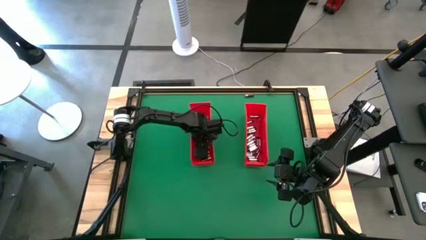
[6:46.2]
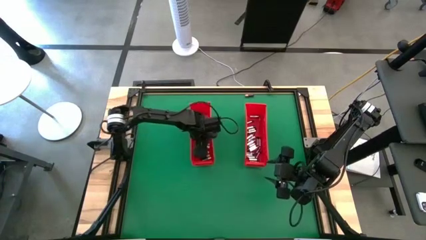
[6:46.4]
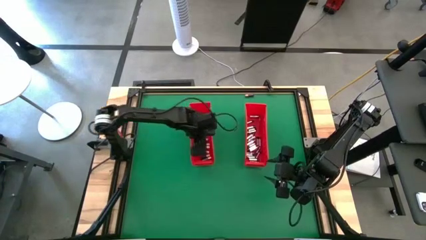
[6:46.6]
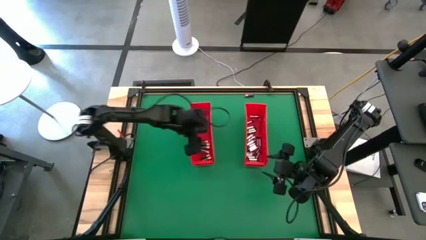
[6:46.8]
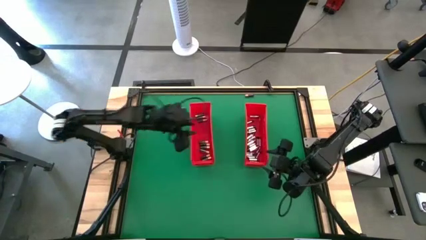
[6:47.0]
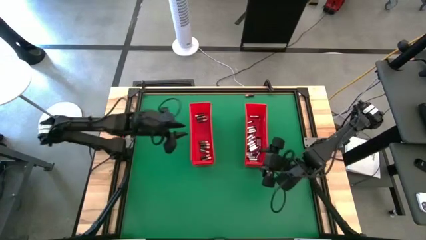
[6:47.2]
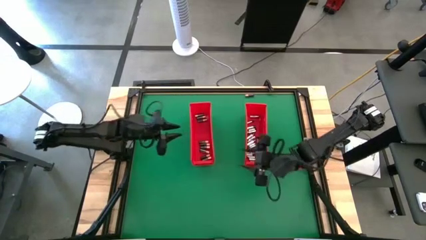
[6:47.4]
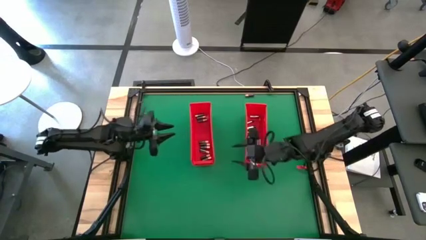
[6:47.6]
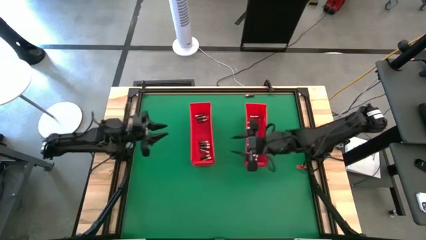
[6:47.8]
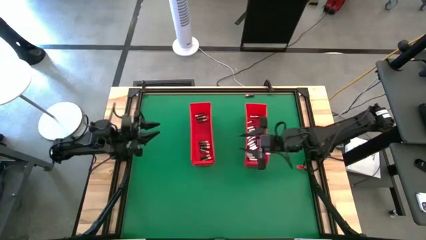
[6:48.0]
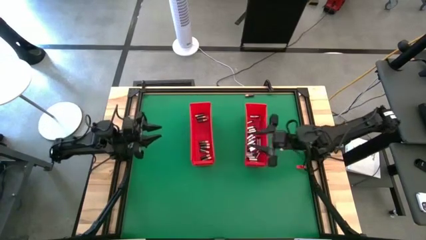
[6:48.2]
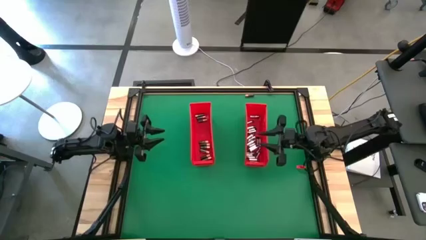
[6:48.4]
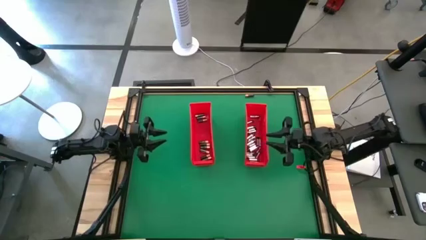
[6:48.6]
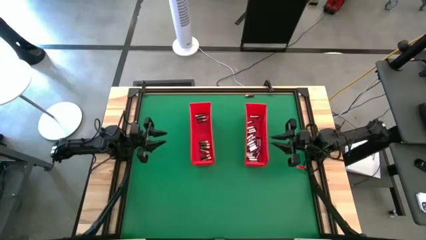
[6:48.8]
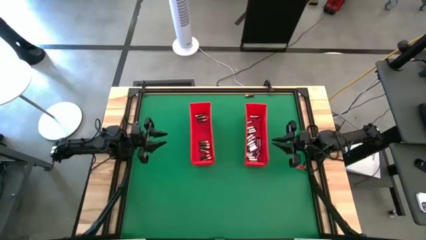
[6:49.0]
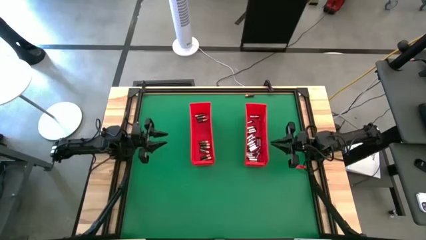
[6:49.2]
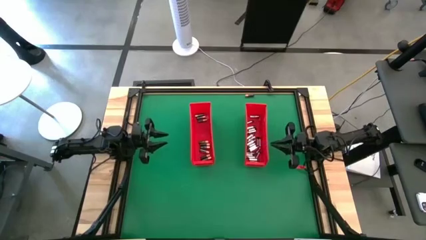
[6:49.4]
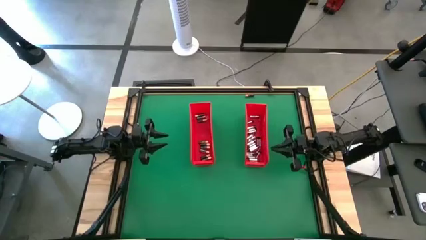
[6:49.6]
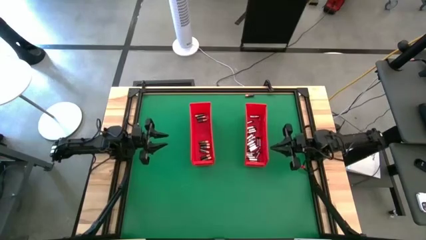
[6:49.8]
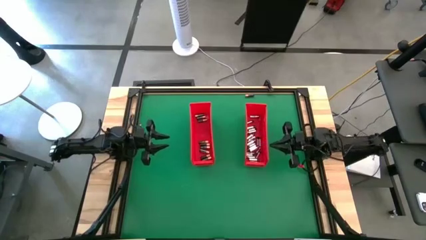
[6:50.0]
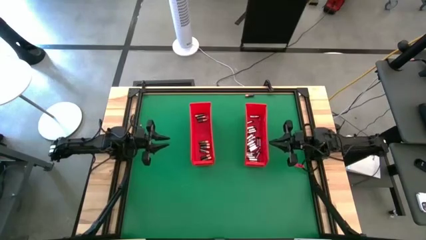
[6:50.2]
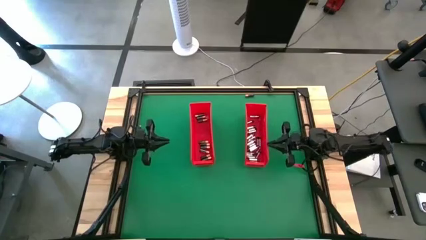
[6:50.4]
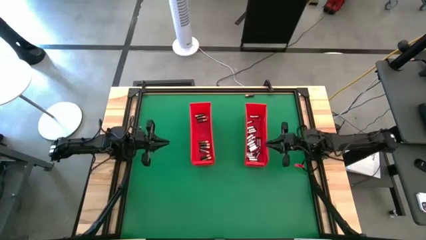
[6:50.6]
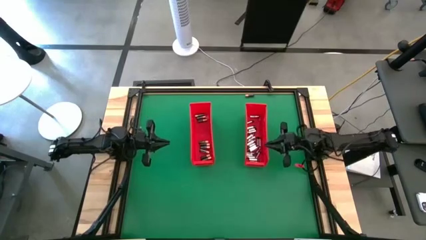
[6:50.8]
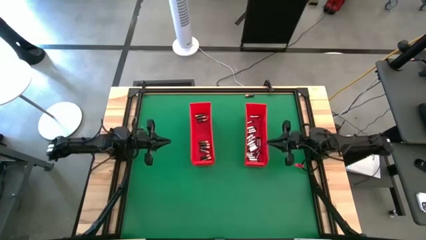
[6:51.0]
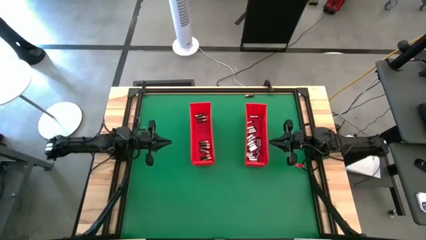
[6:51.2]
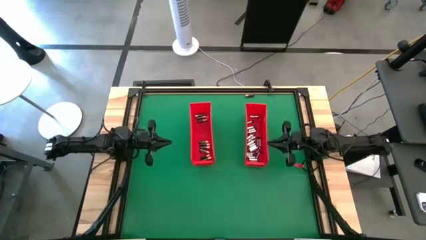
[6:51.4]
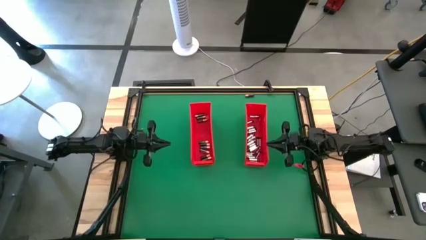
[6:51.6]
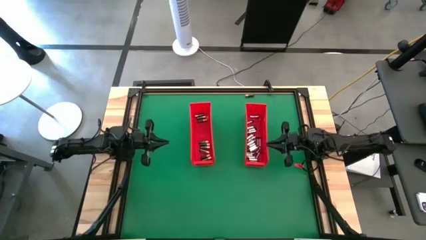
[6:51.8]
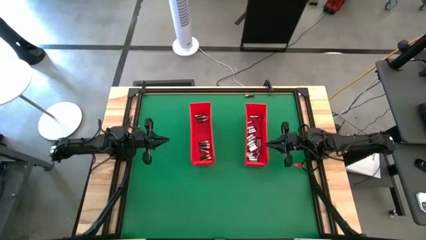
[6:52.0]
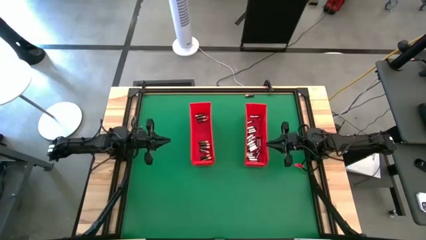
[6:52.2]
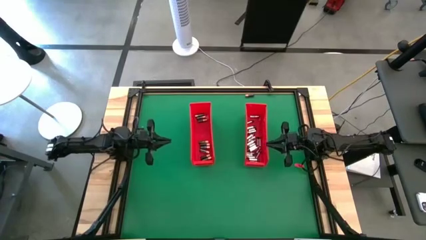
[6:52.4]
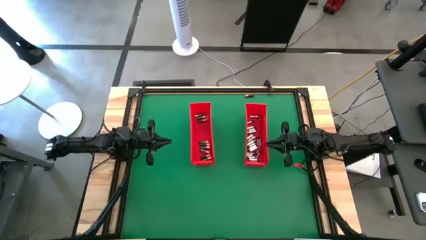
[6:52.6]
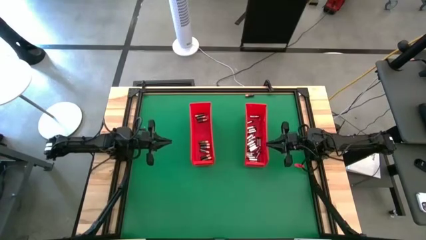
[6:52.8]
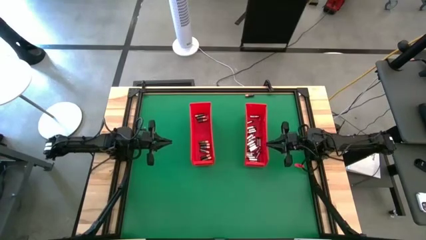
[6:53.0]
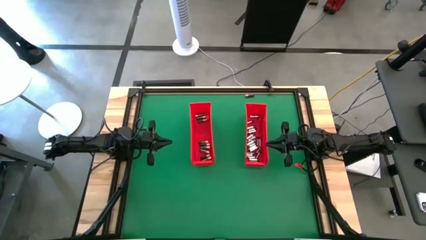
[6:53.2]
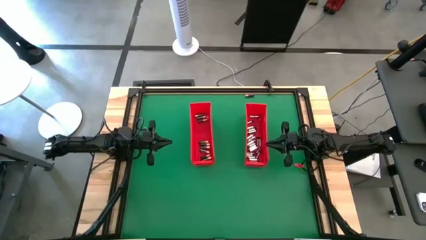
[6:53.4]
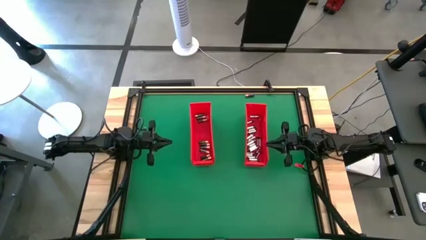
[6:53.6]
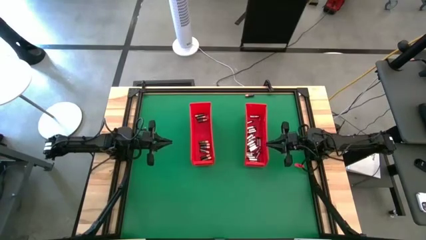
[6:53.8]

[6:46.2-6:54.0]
Task: Sort batteries
Return to Home Position

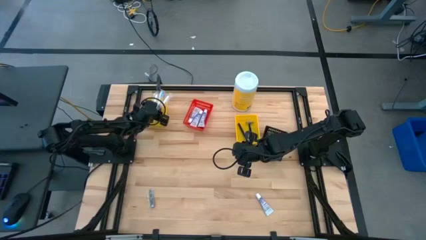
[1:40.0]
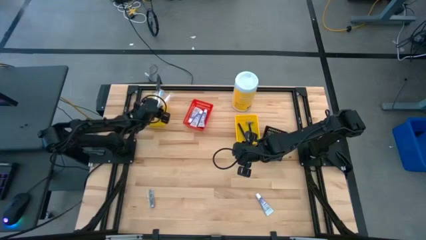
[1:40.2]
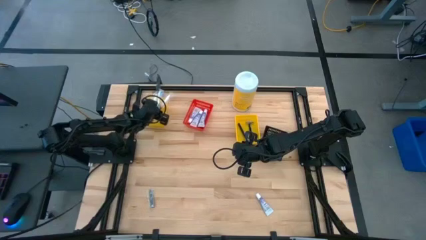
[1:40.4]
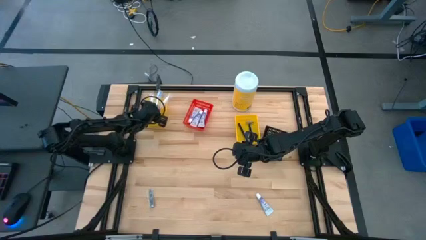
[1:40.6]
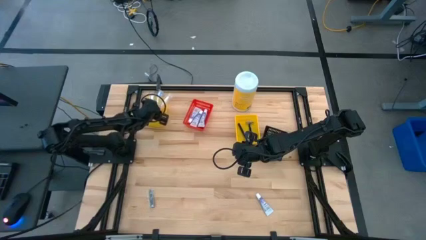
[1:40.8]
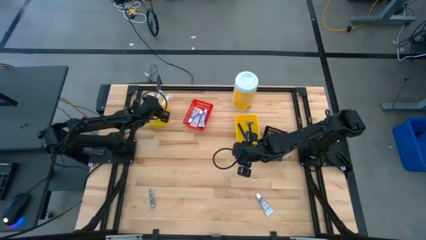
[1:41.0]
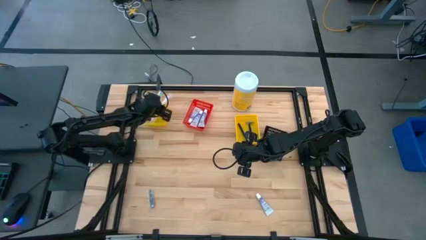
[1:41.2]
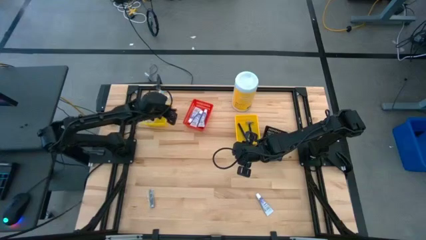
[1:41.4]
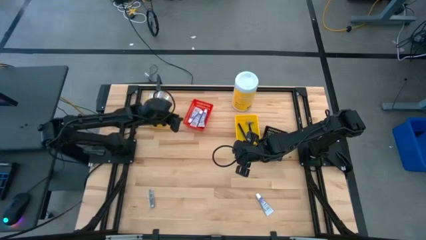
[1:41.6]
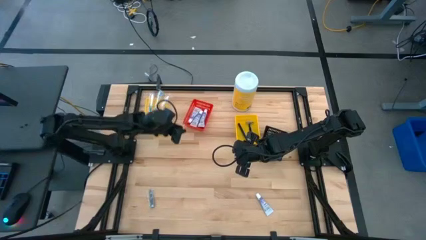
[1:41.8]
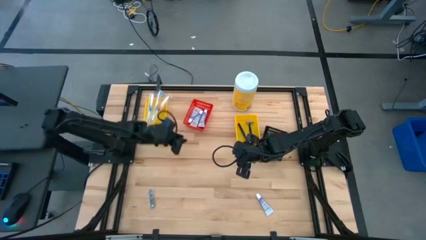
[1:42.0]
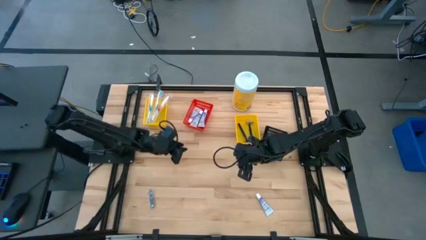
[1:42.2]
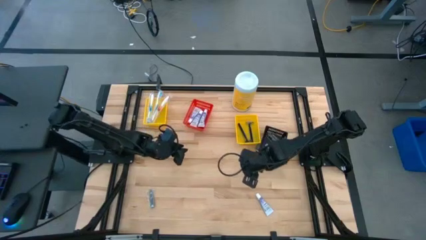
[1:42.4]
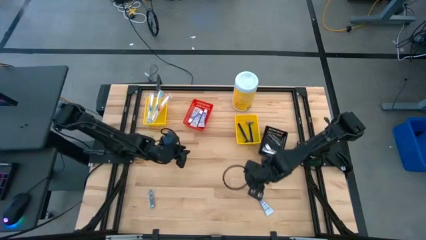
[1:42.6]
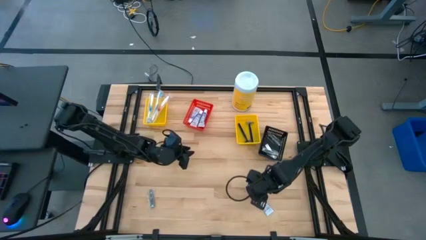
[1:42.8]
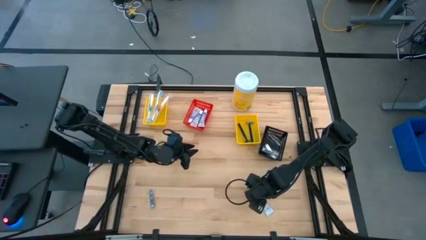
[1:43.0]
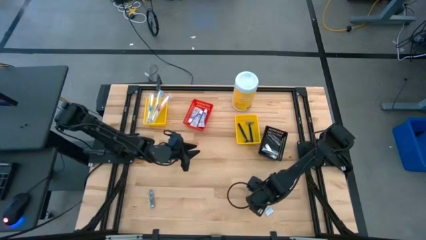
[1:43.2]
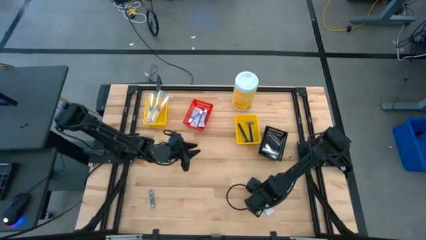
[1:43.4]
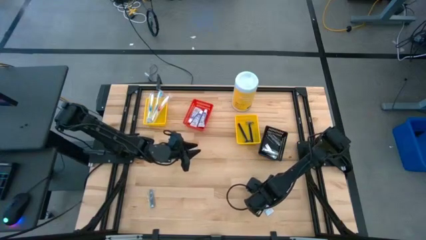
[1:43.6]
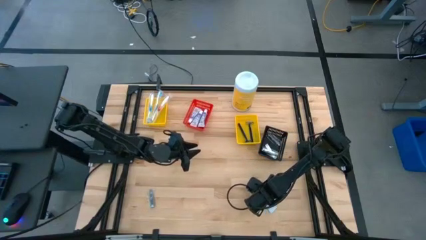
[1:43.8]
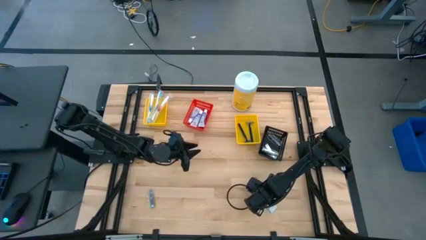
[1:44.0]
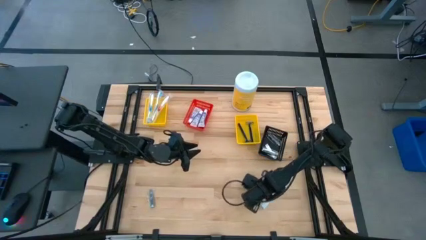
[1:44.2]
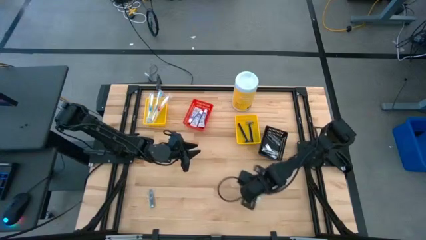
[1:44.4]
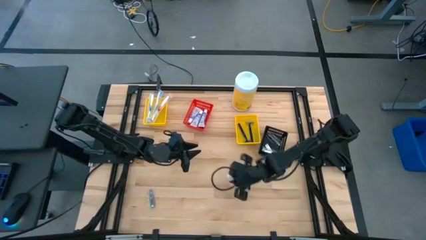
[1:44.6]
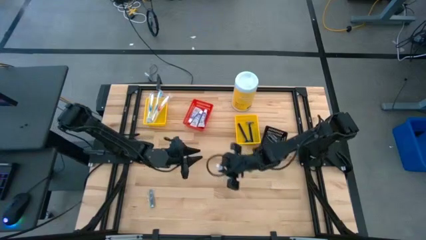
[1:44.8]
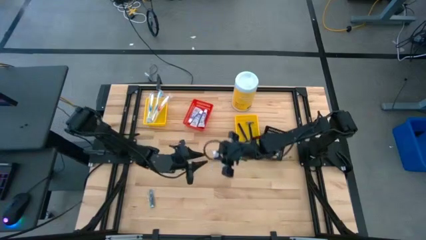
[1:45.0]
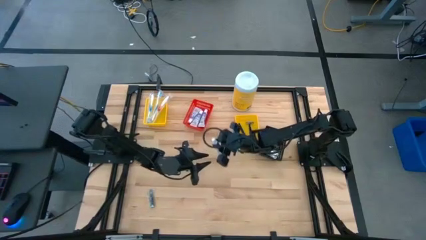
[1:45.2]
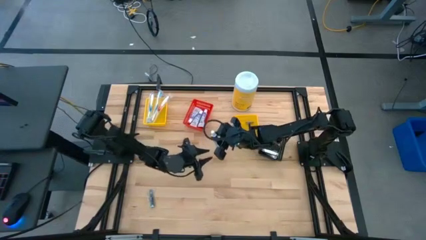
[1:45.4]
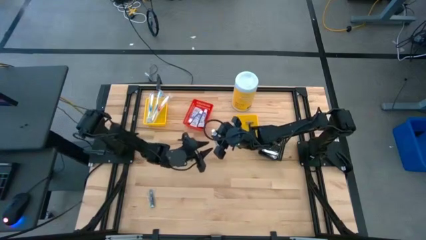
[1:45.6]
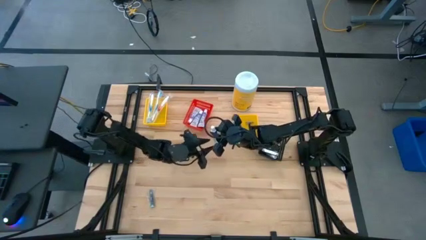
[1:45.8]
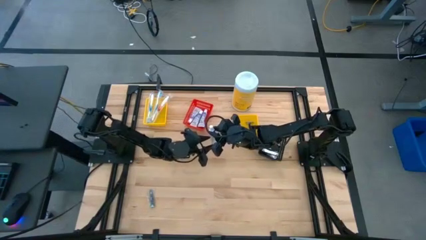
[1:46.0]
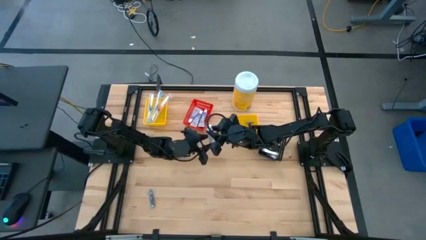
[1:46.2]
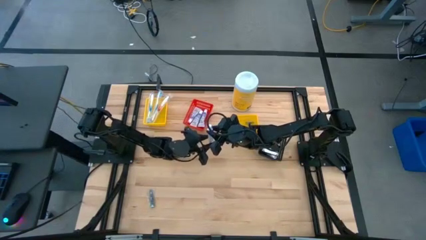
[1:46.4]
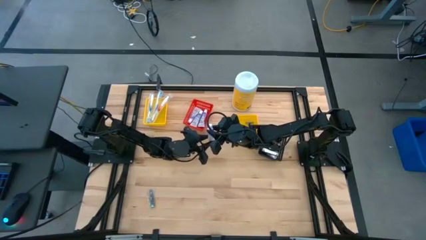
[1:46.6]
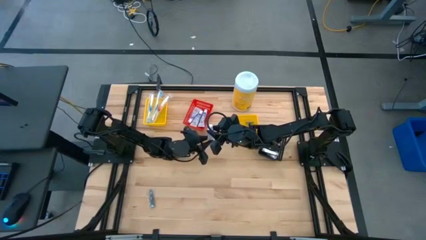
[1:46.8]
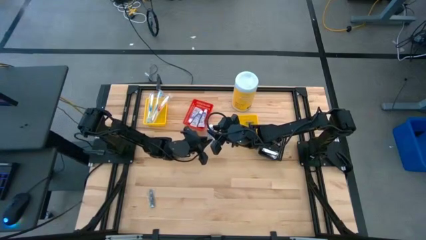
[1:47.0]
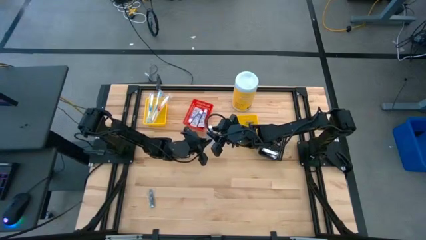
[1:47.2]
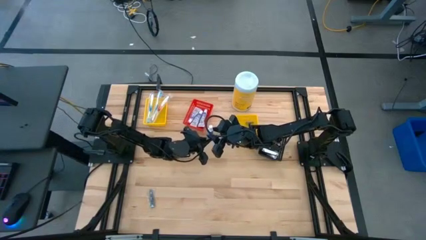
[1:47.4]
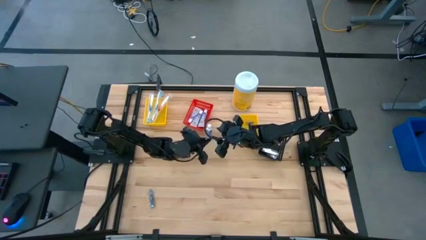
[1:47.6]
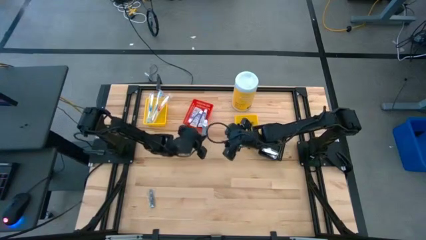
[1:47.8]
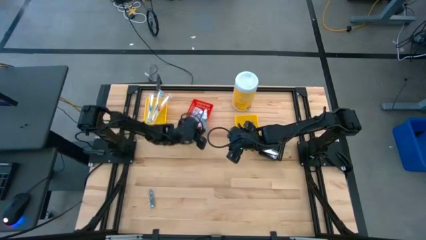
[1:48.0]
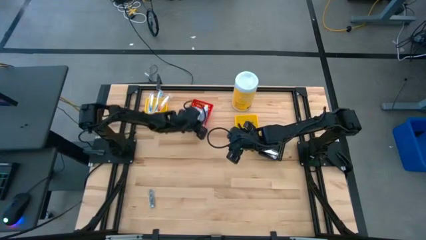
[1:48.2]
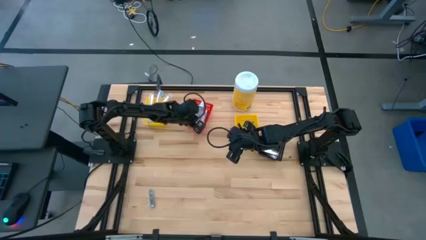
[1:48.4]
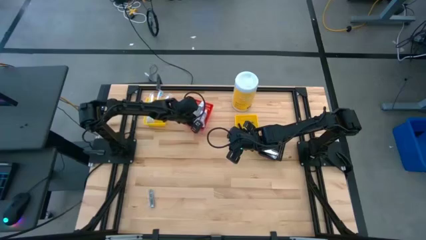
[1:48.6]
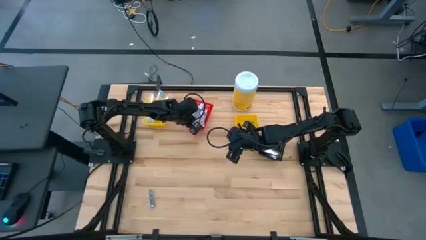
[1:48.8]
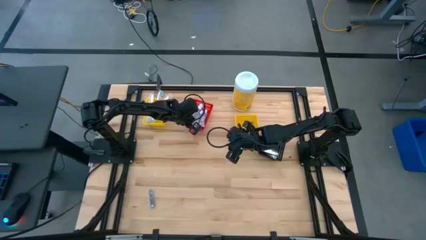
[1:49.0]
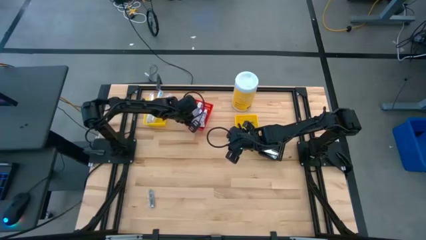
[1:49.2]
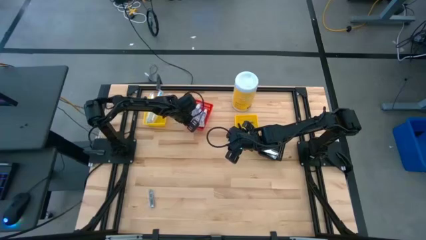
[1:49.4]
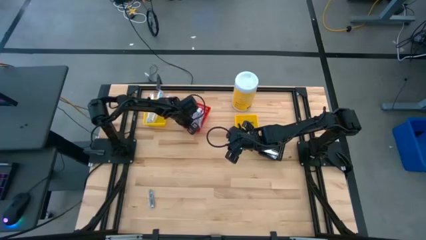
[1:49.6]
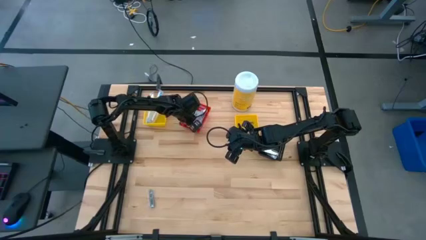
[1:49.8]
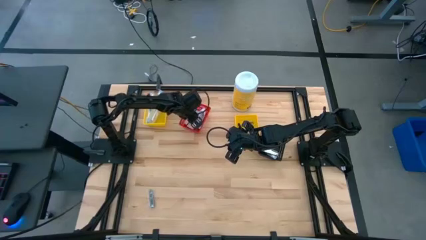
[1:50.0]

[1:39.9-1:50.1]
Task: Pick & Place Travel size toiletries
Put the white toothpaste into the red basket
